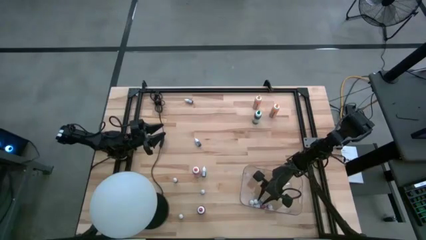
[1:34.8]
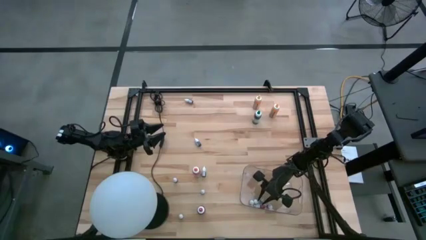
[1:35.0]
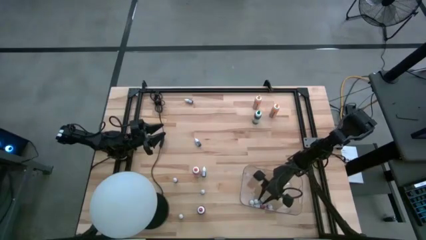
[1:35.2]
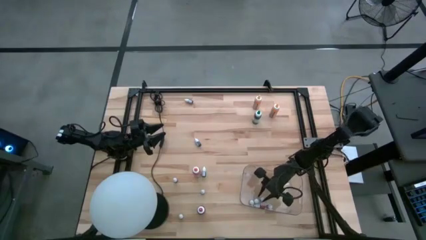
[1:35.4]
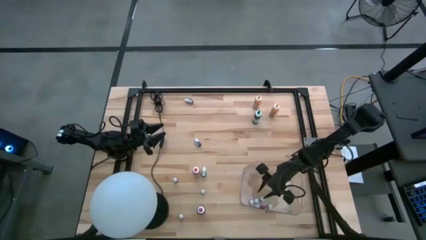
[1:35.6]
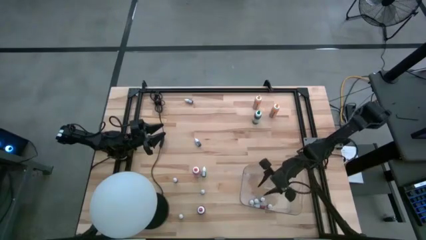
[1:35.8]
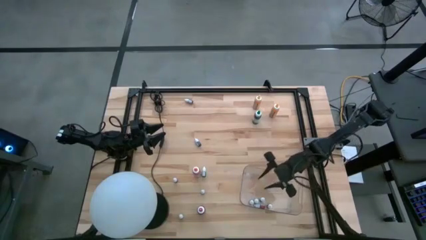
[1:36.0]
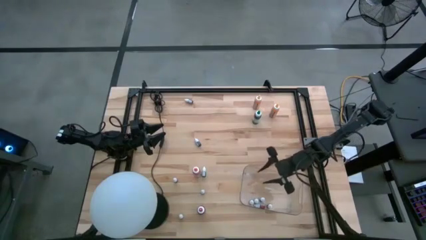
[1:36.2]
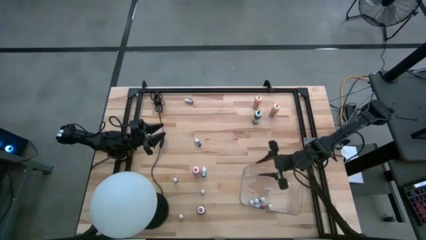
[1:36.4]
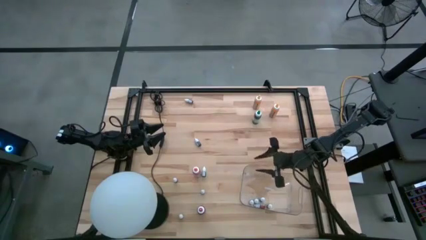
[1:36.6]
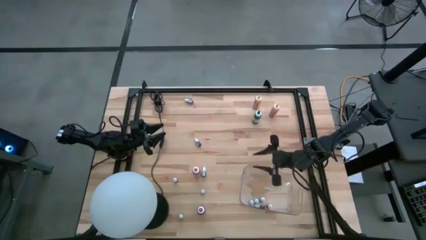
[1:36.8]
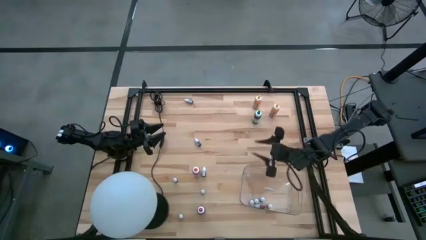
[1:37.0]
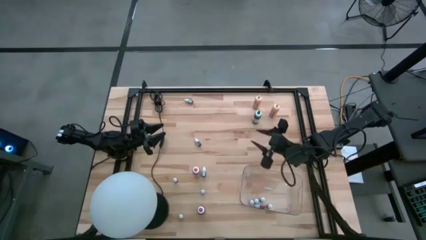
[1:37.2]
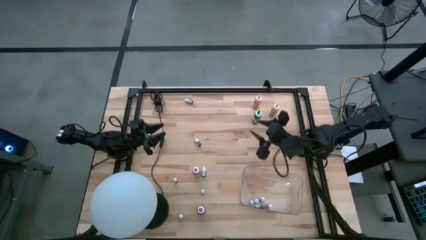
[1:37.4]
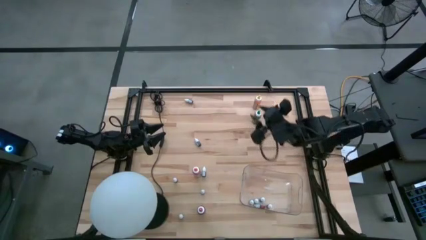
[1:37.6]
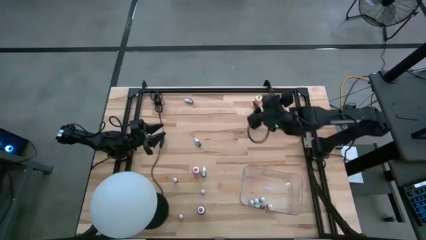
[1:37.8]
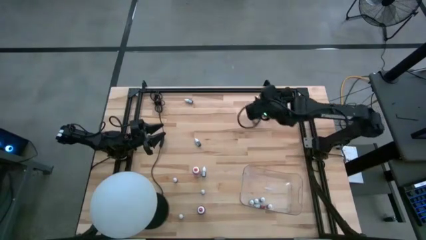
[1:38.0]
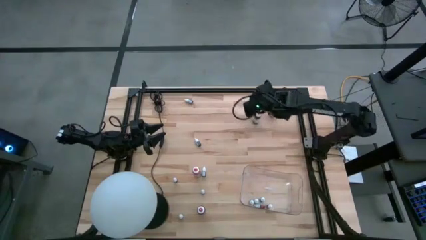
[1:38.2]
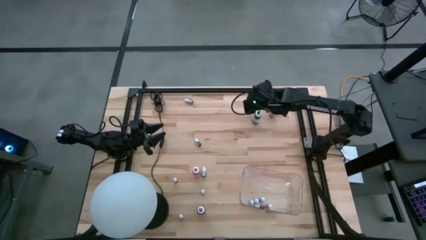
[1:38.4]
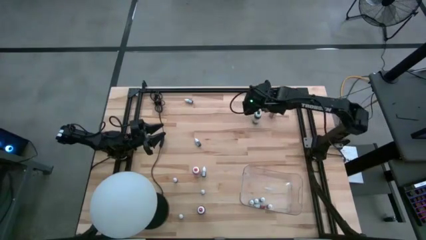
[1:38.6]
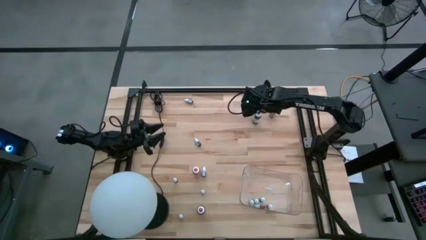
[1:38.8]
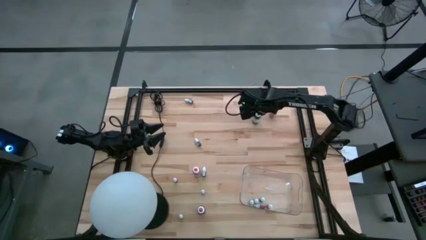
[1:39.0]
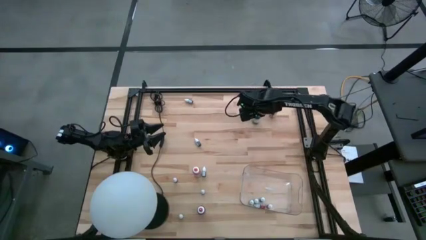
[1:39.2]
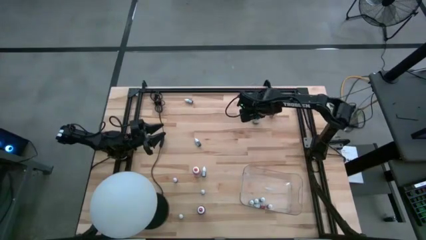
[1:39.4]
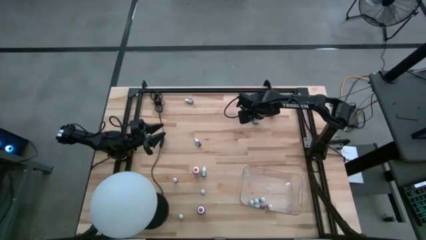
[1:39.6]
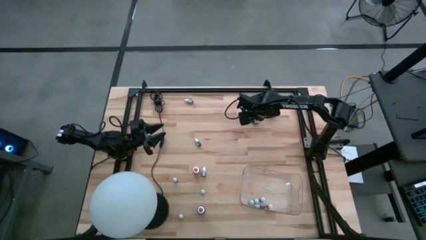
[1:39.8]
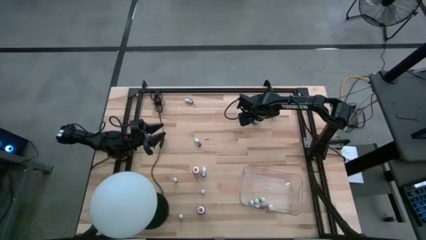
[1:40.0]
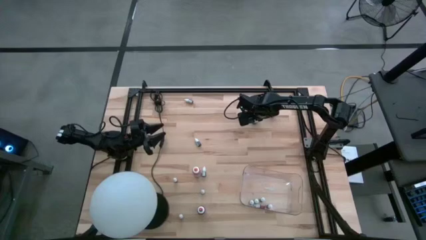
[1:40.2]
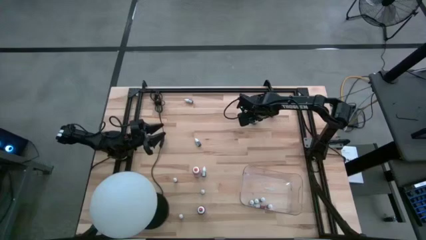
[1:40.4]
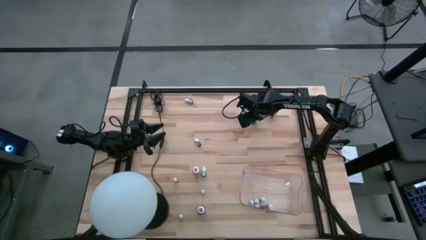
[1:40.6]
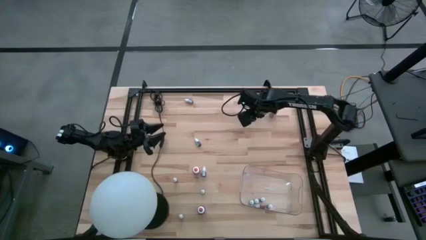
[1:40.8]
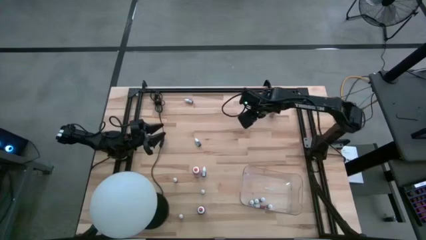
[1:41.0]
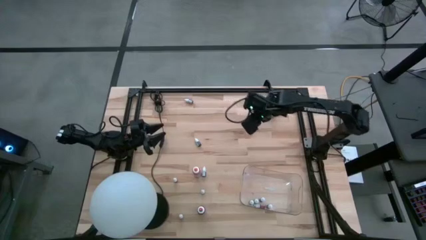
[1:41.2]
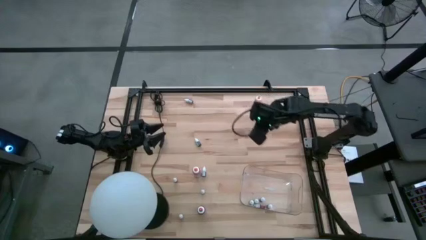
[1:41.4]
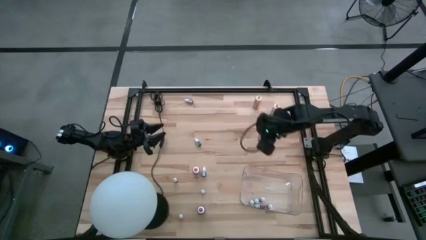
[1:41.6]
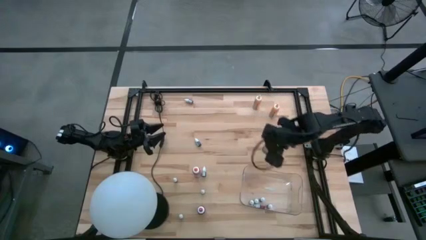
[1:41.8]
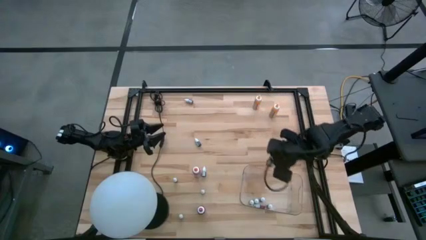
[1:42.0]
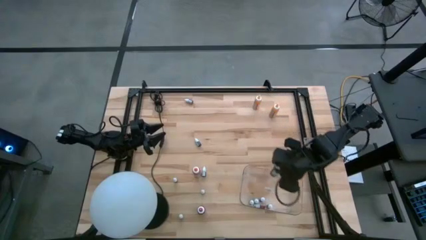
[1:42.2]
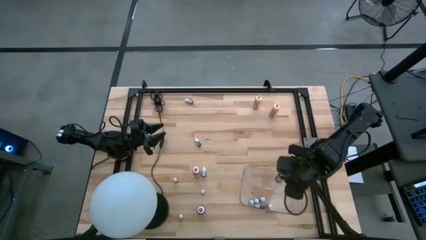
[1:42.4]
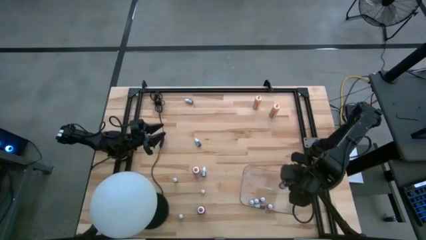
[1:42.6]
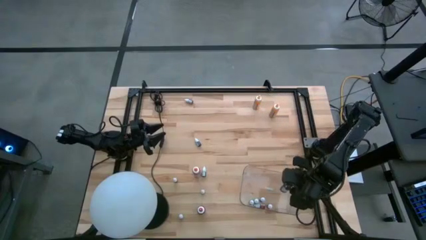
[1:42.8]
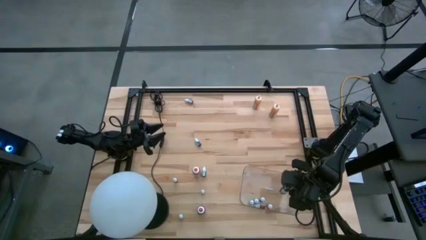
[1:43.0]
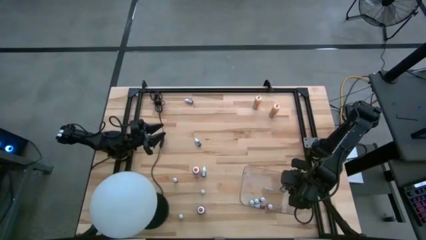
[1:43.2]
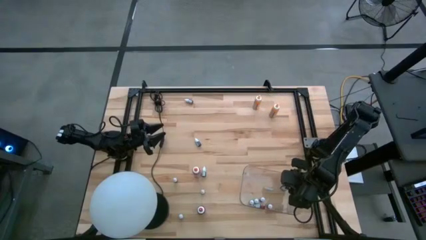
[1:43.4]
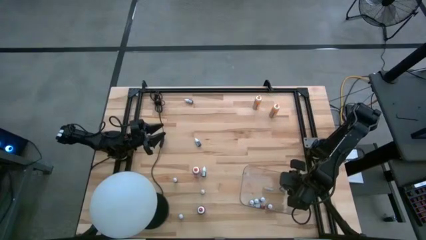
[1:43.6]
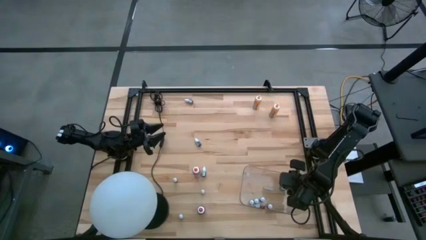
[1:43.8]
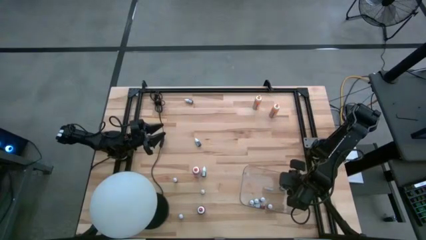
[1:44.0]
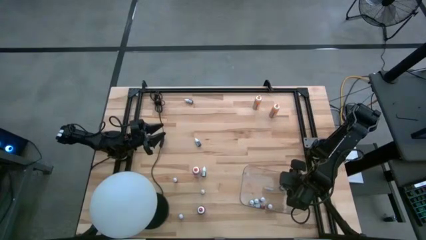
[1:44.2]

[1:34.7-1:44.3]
Task: Pick & Place food coloring
Put the green food color into the transparent bin

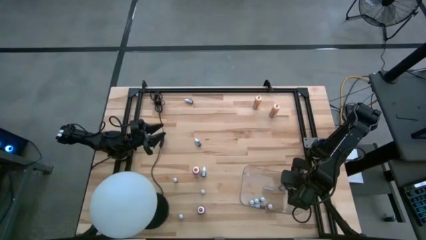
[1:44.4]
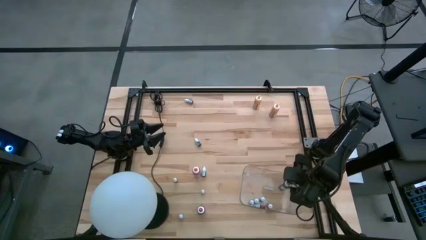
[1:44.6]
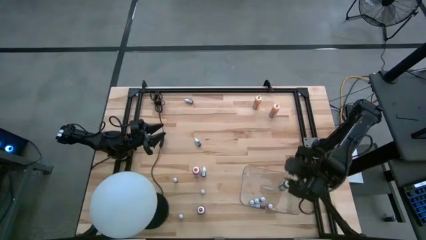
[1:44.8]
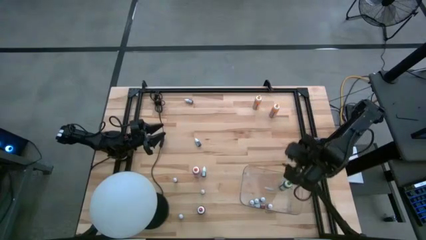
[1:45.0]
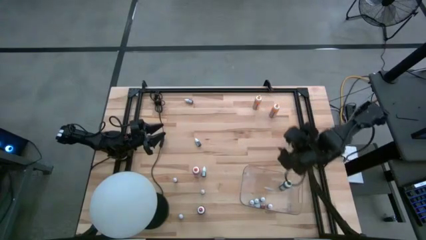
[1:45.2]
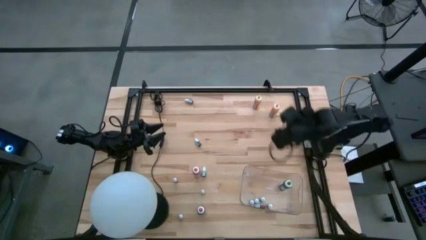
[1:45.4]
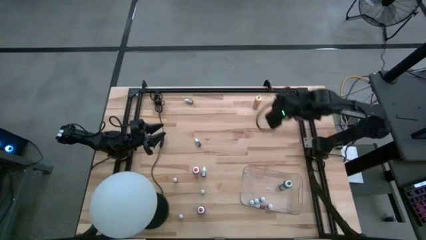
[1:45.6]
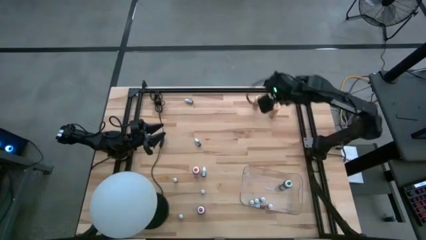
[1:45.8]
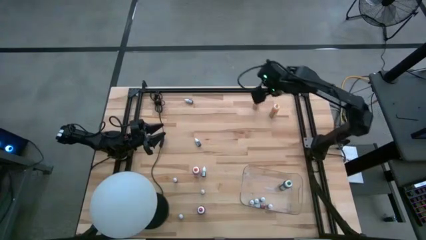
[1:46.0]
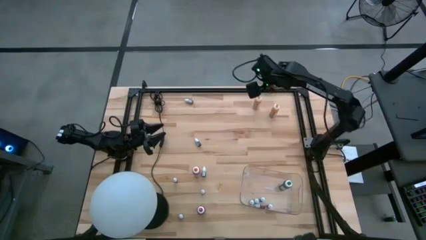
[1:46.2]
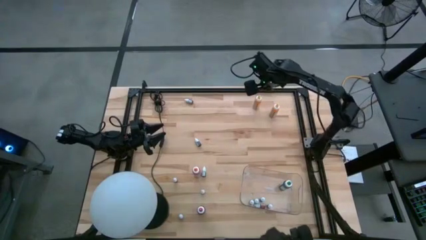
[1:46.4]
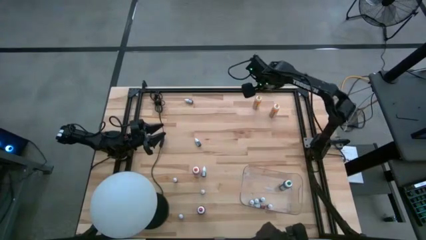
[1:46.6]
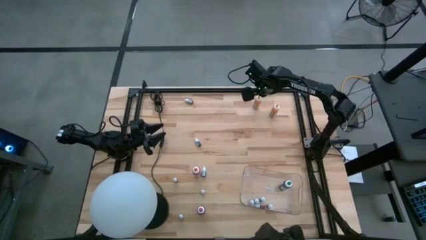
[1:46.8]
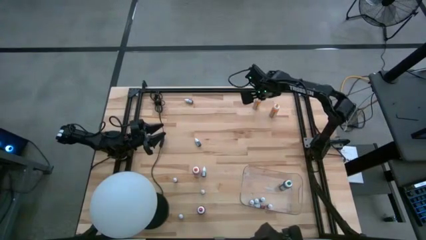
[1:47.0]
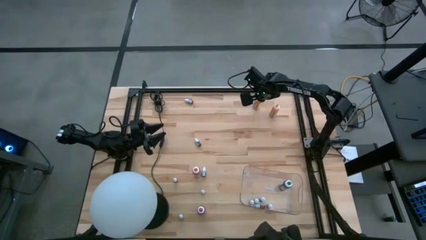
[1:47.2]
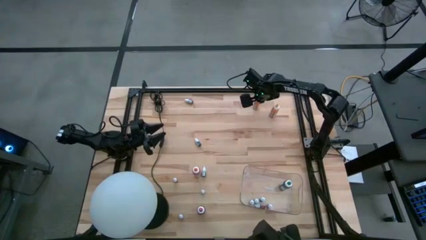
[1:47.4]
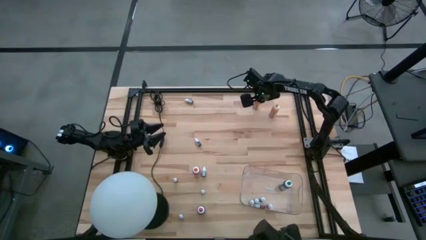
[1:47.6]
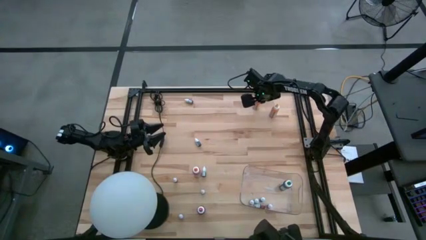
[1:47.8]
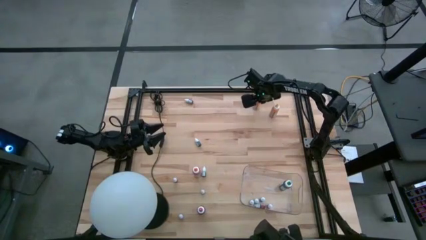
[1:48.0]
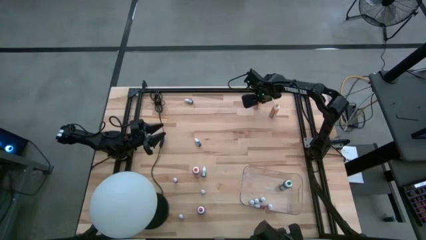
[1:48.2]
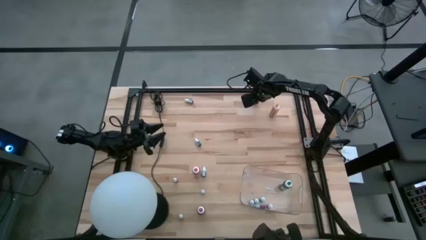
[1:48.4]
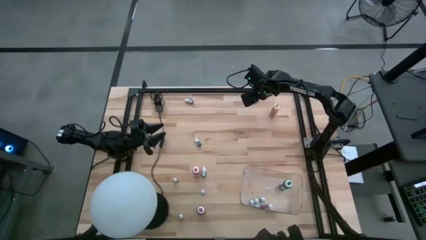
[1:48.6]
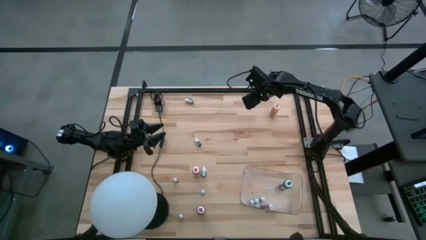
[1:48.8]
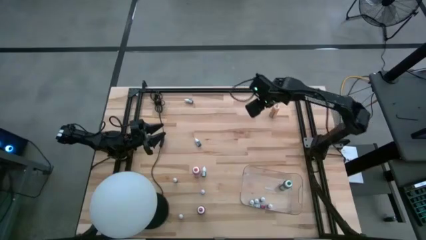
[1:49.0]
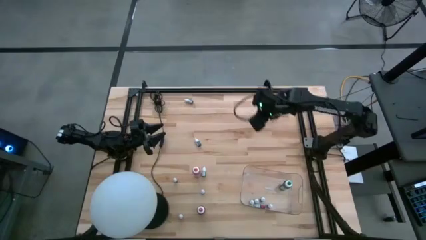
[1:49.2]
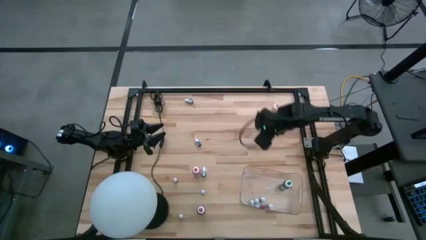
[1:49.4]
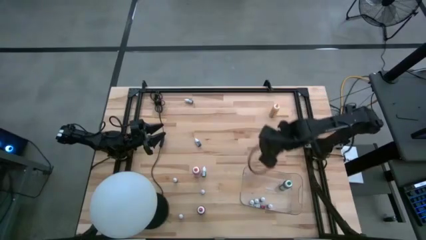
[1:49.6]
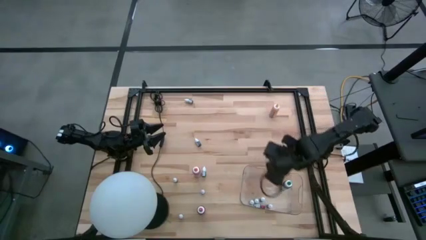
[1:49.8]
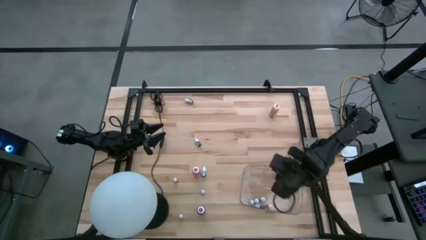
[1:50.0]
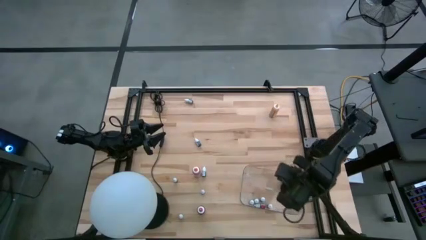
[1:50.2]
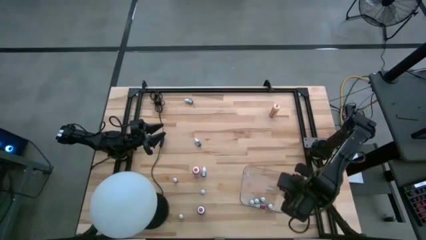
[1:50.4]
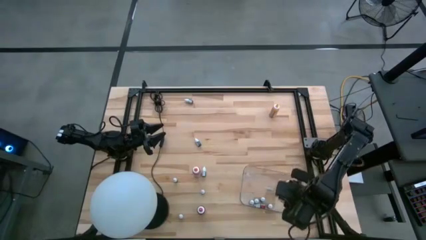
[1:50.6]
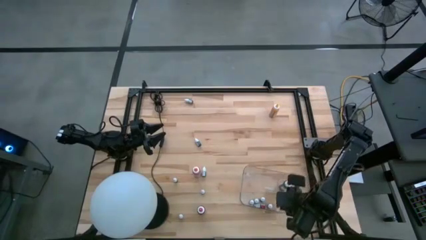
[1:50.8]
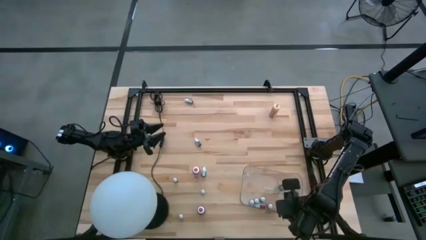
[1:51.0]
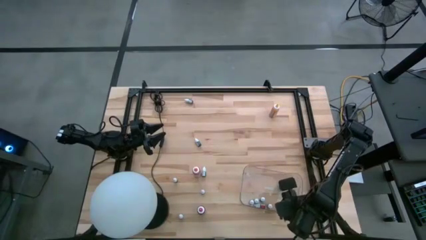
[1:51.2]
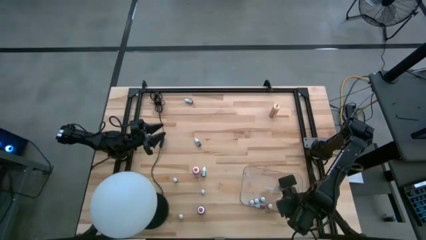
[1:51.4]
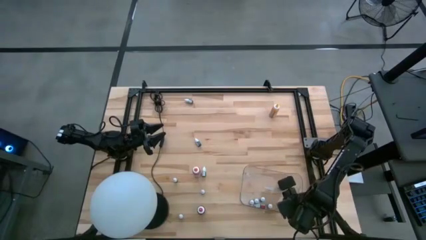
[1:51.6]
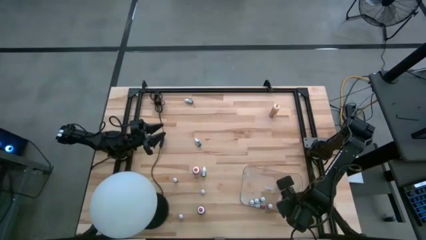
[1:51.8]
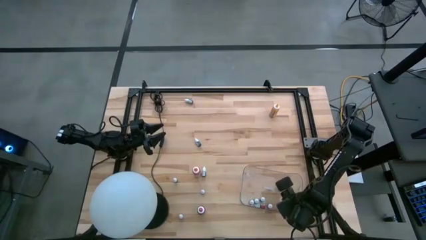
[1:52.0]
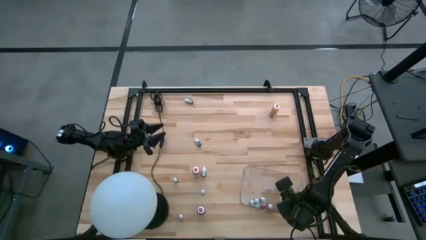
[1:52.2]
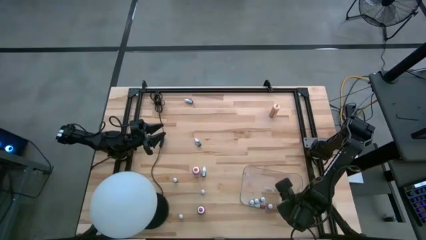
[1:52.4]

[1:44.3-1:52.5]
Put the top yellow food color into the transparent bin

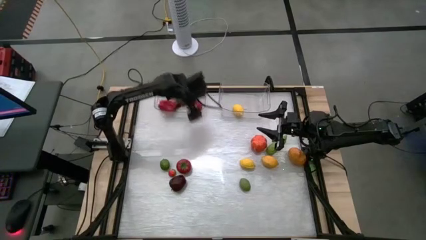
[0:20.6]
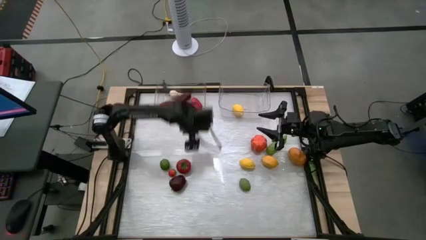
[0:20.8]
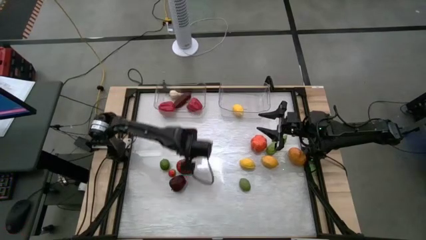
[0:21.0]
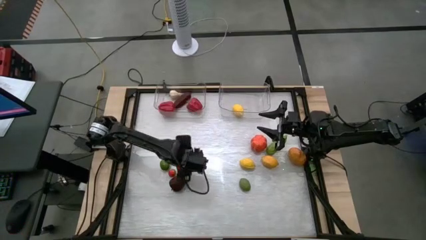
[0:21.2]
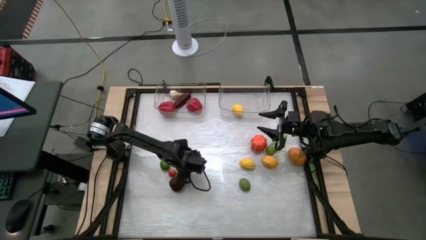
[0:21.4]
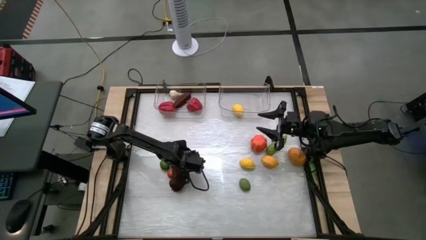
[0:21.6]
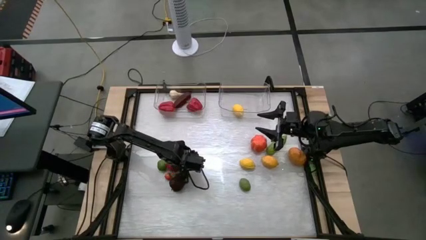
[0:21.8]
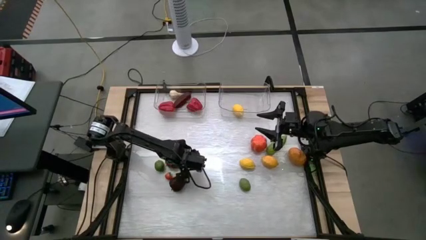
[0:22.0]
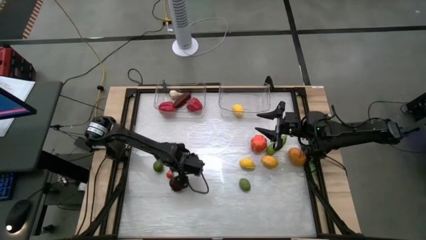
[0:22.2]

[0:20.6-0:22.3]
Task: Sort produce into baskets
Put the tomato in the container
